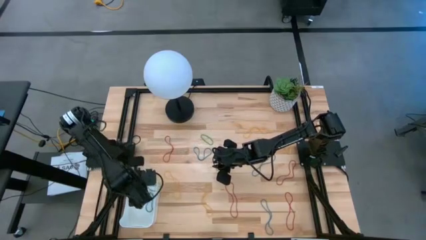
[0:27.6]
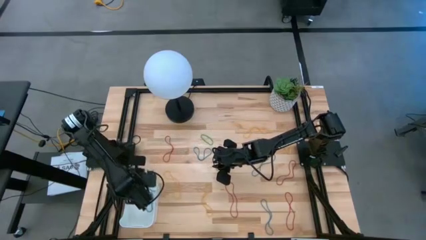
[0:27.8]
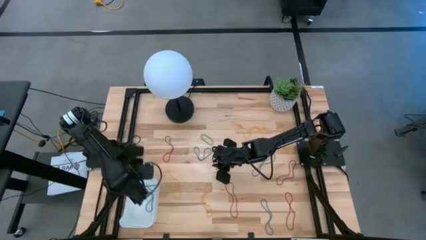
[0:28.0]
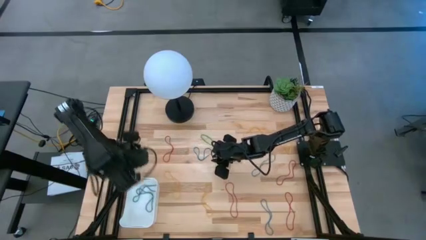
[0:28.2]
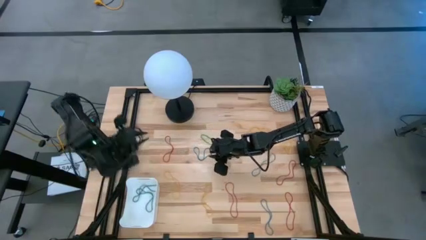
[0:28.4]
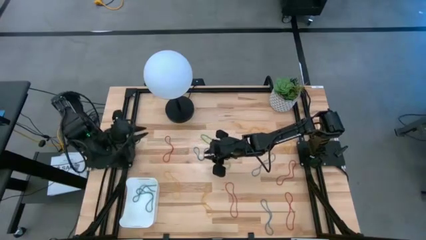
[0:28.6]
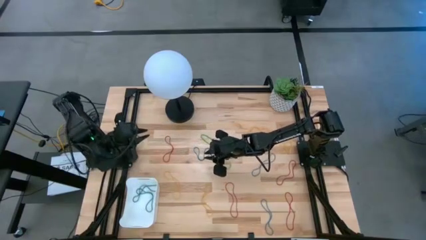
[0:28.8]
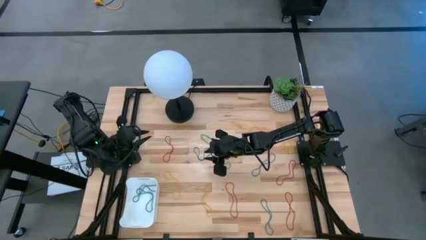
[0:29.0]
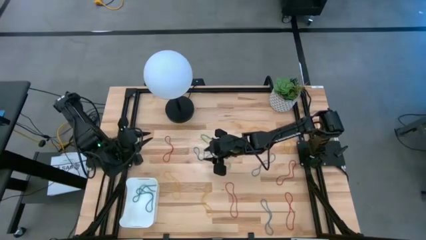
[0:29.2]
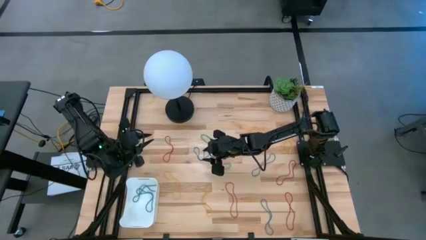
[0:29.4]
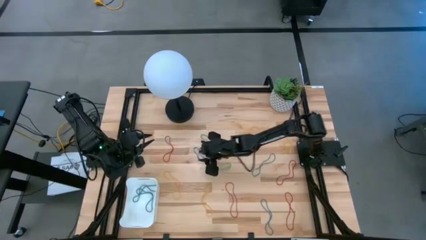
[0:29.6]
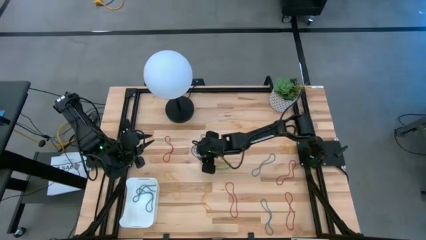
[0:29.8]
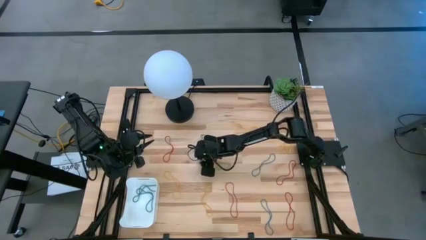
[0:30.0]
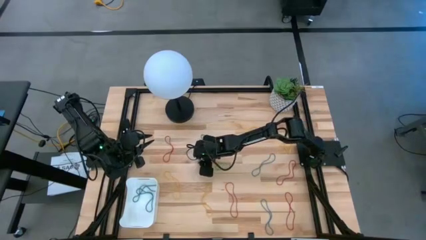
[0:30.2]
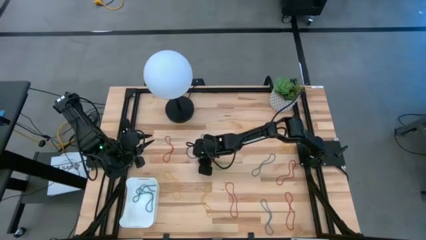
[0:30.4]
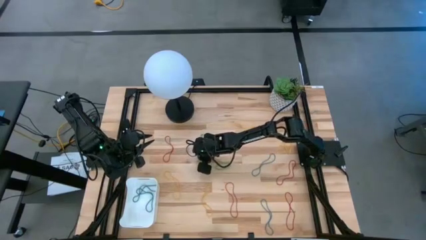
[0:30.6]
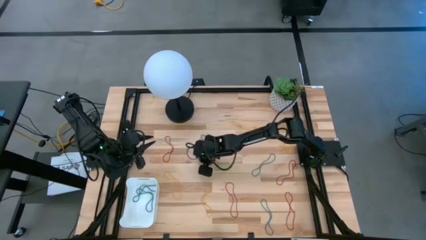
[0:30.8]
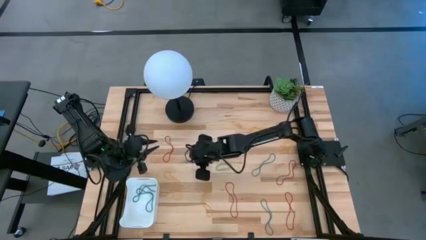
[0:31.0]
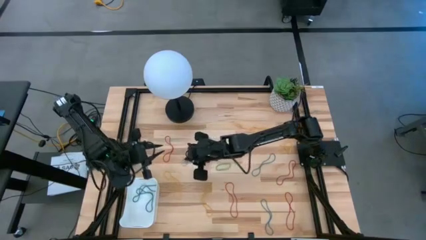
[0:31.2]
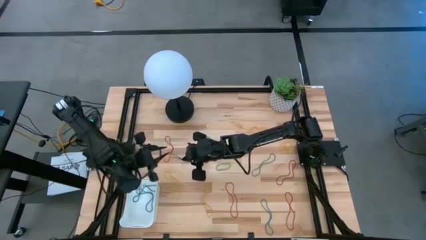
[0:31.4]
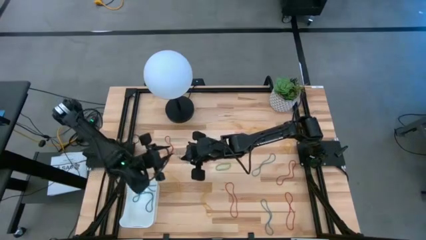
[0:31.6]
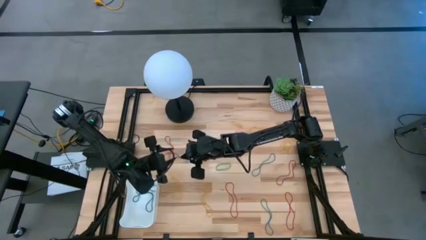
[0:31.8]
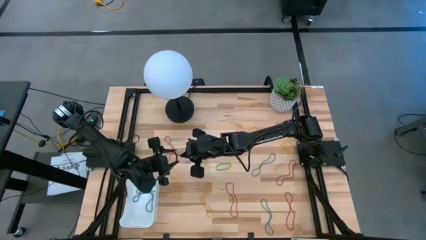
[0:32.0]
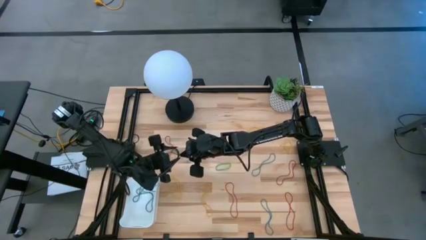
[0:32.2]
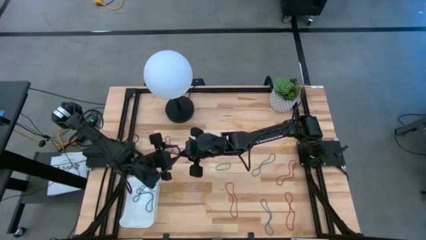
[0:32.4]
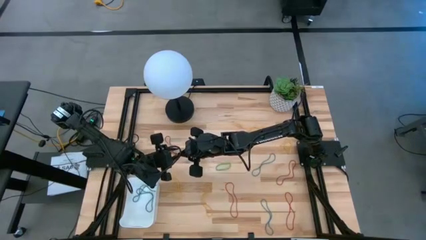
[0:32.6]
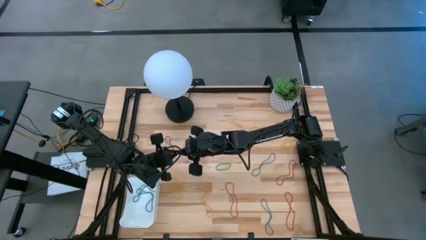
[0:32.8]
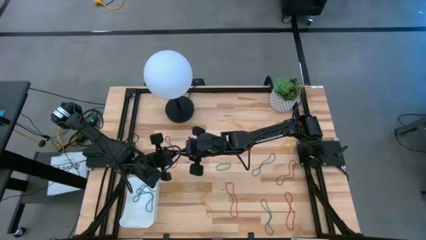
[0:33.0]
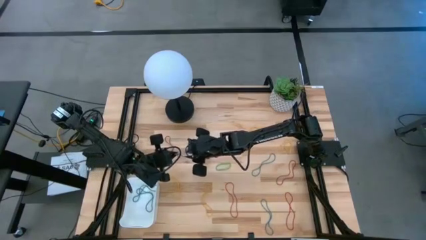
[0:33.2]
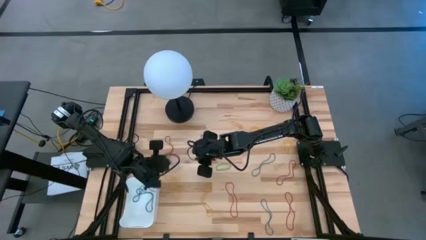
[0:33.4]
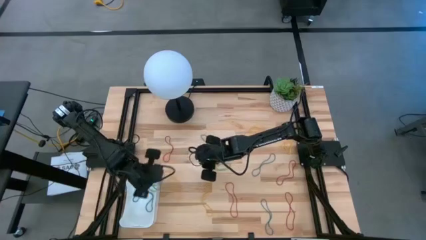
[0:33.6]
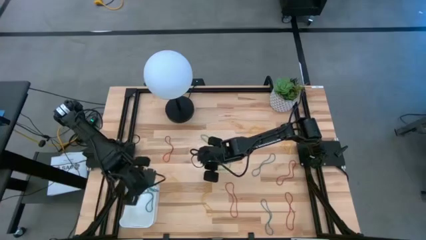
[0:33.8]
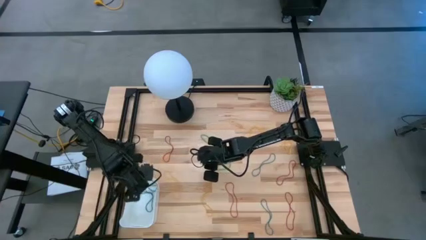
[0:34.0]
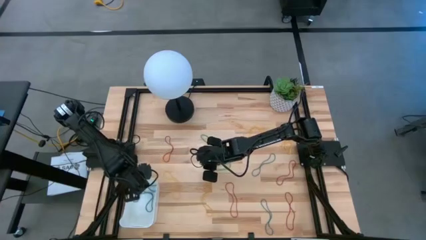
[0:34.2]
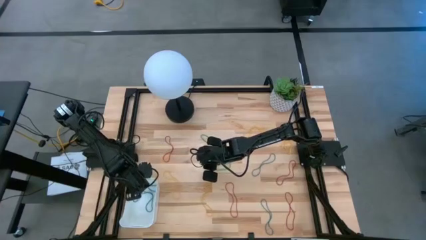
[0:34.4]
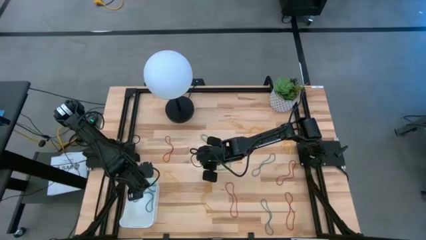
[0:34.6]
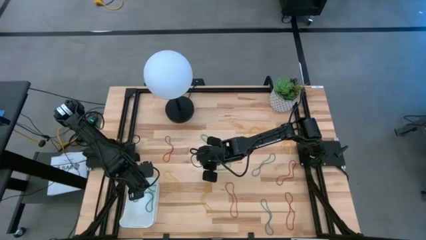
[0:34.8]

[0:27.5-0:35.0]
Task: Pick and place items into bin
Put the top left blue rubber band into the white bin

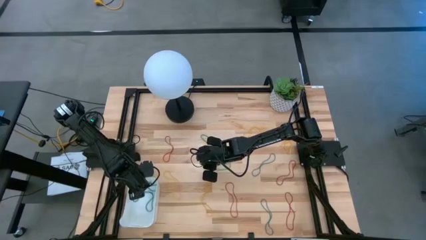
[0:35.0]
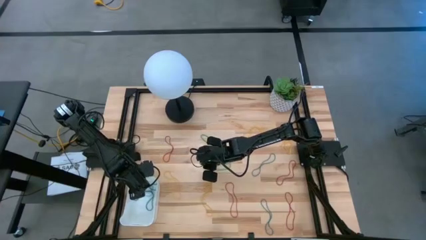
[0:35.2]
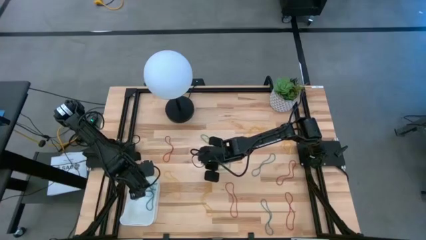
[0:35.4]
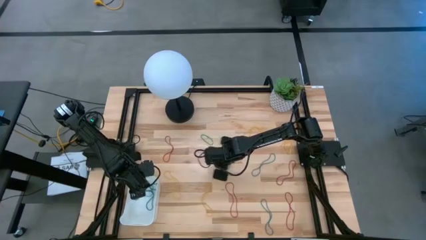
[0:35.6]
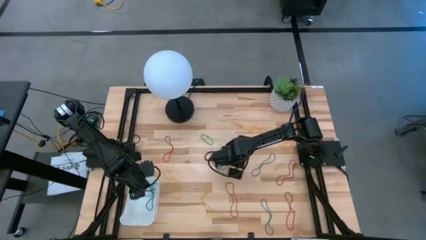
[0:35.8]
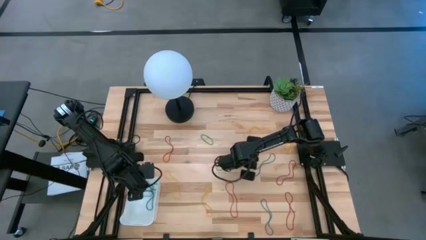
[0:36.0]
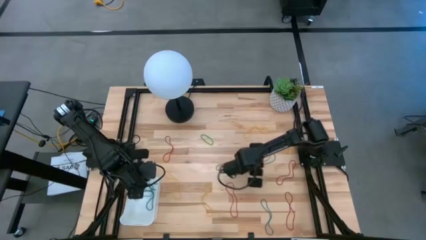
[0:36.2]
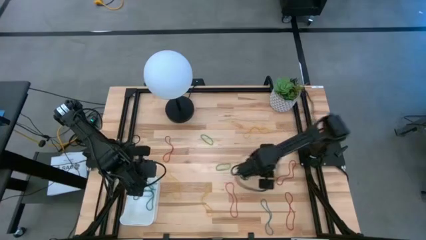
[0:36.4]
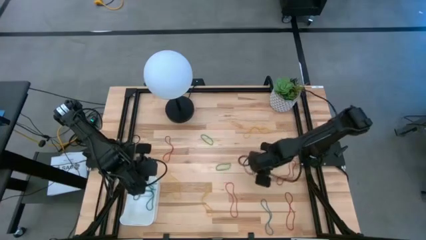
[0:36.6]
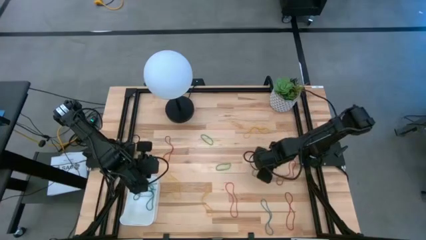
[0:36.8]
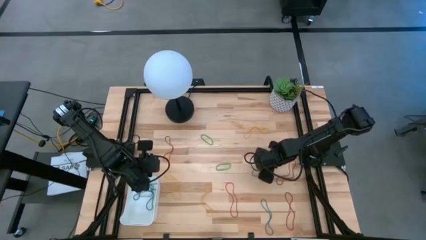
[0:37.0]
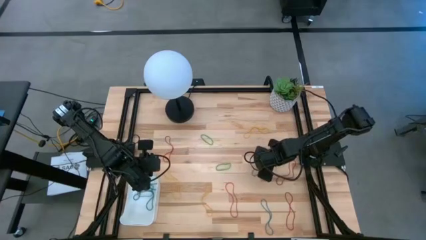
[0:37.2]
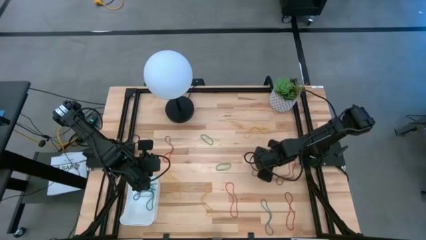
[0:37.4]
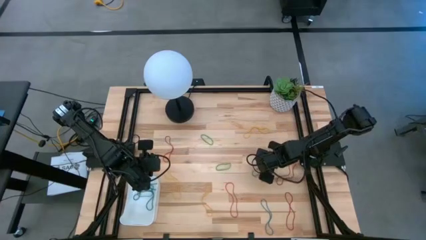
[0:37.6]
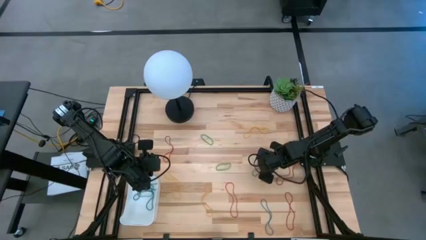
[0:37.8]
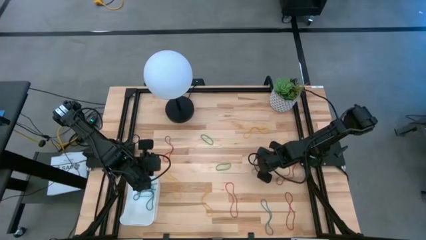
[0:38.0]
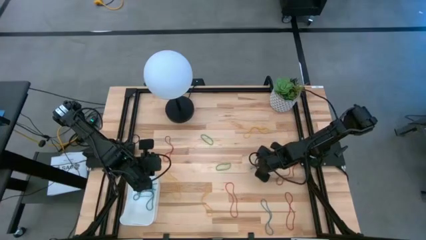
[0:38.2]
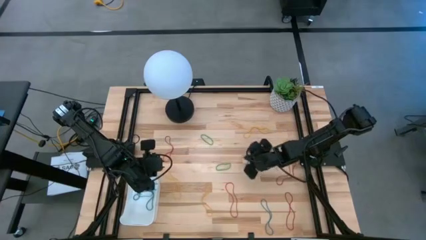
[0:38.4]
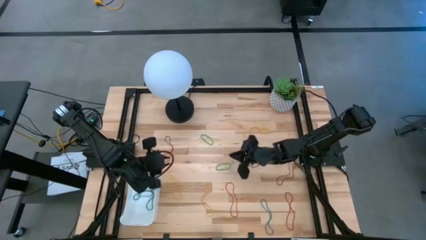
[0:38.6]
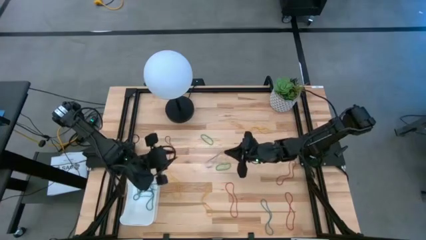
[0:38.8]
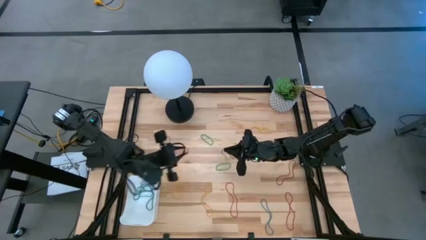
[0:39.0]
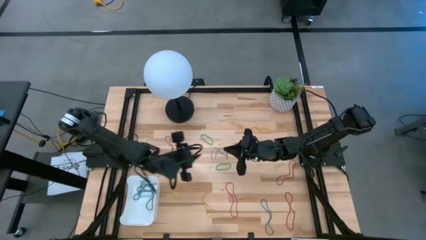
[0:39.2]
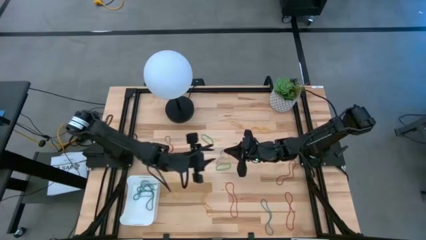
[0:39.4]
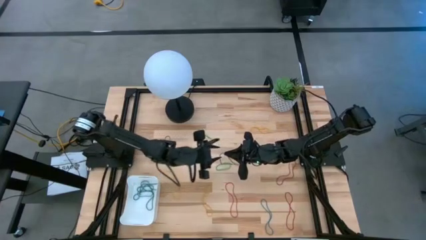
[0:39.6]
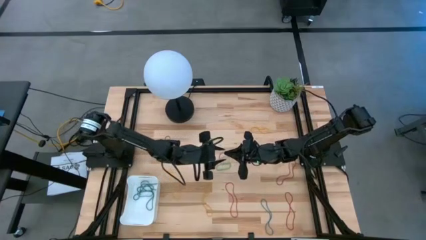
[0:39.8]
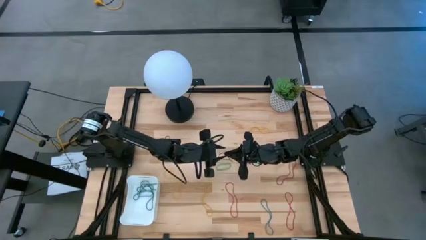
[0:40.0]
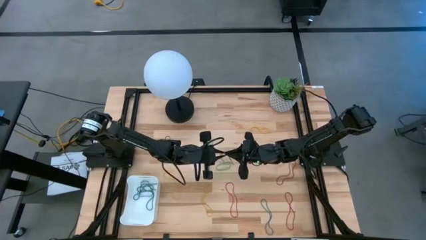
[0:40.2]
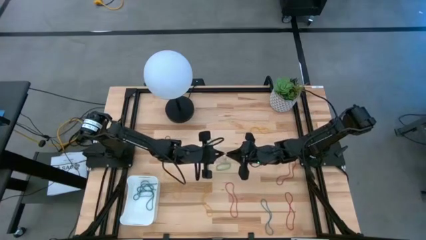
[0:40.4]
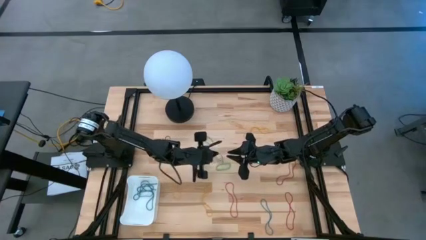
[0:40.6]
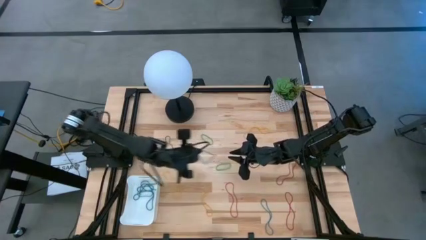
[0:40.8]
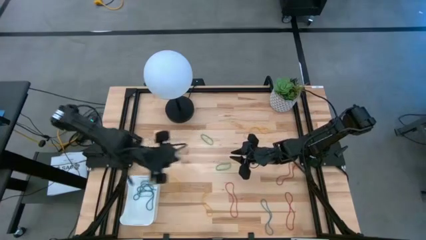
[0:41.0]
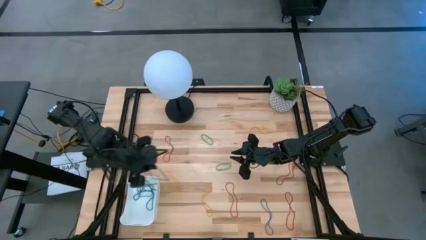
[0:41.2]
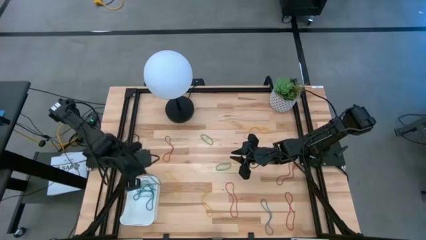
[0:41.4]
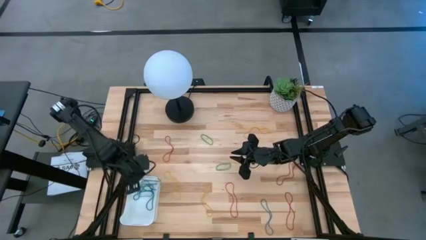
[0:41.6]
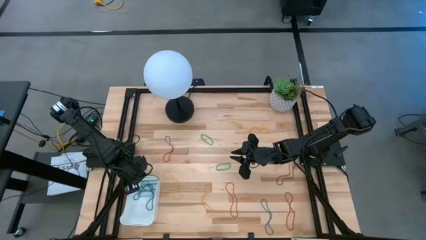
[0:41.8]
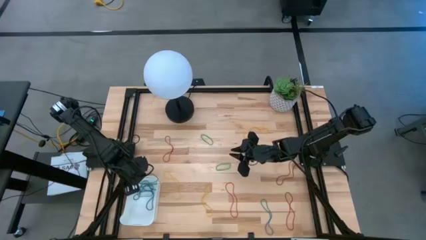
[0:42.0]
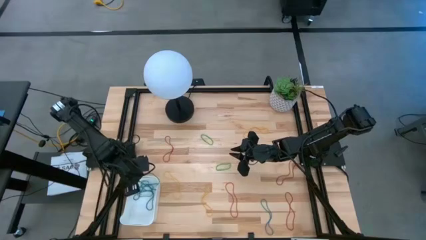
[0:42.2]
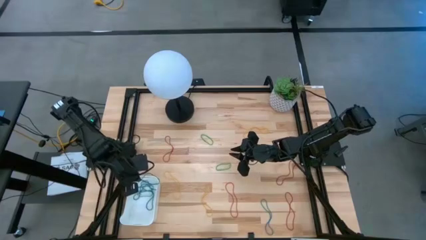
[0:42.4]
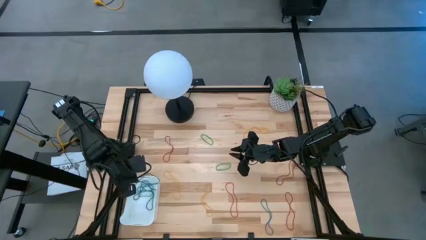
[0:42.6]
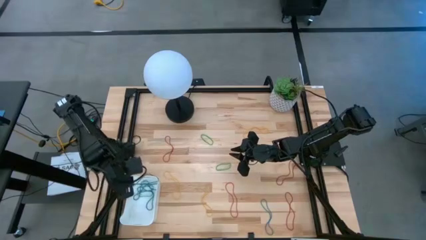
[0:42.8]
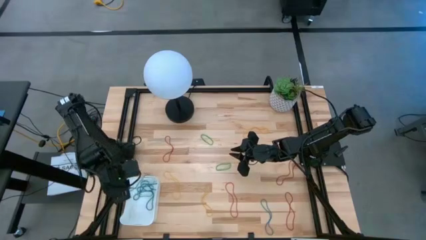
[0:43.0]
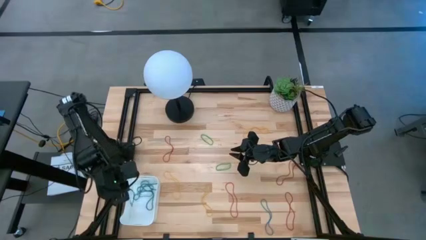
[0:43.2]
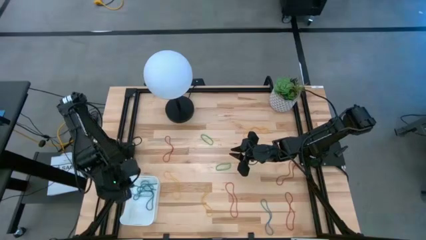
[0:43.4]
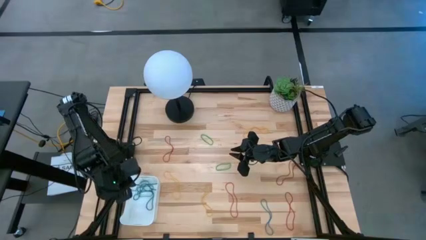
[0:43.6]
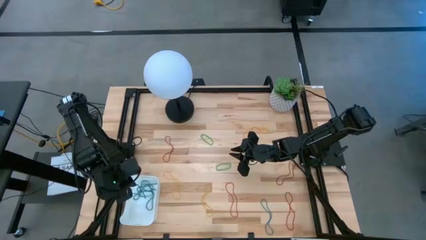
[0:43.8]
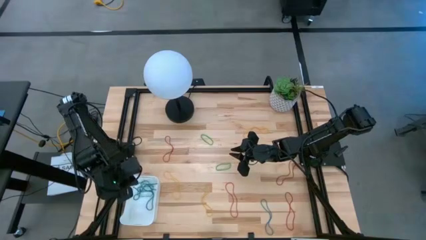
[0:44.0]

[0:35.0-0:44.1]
Put the top blue rubber band into the white bin
